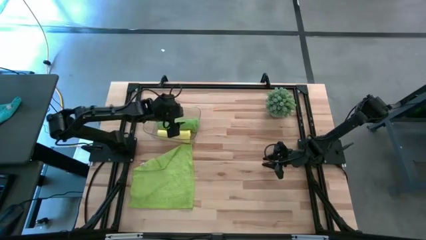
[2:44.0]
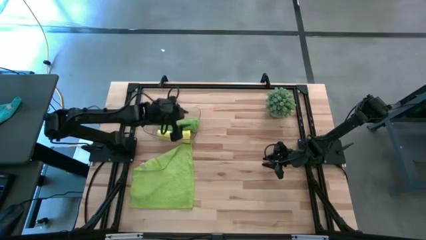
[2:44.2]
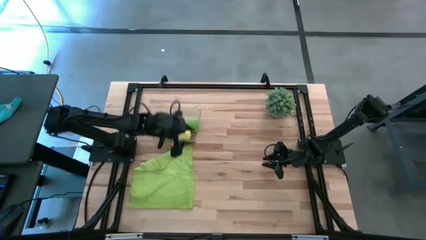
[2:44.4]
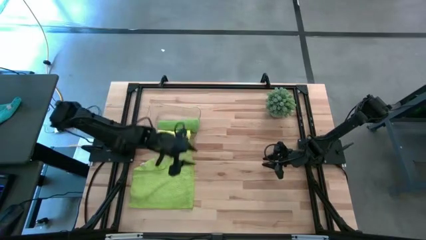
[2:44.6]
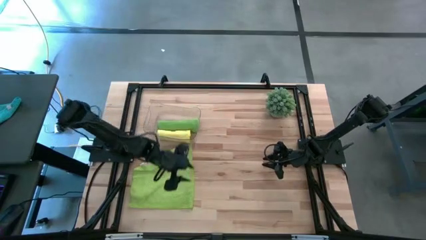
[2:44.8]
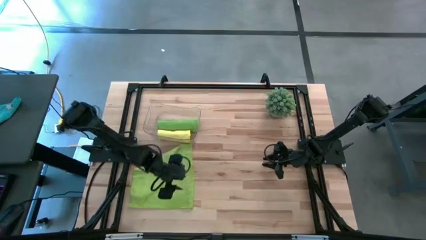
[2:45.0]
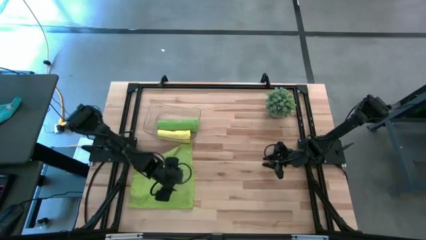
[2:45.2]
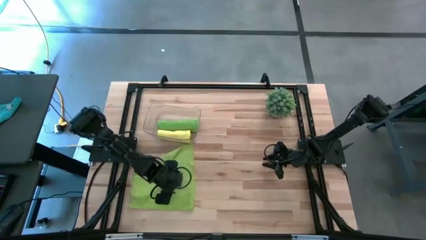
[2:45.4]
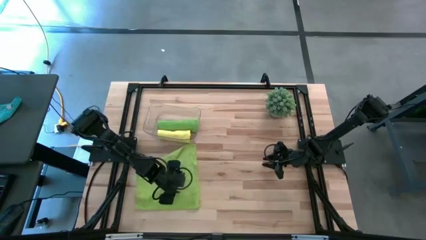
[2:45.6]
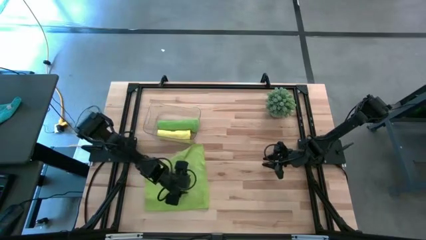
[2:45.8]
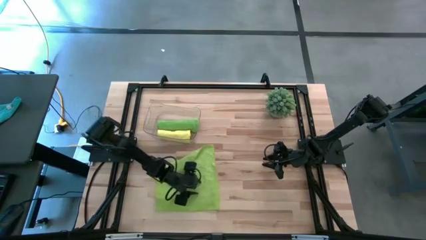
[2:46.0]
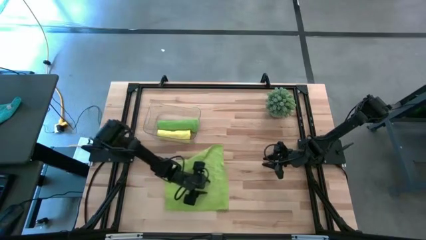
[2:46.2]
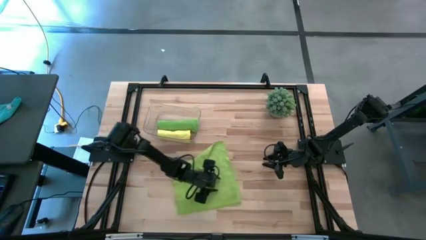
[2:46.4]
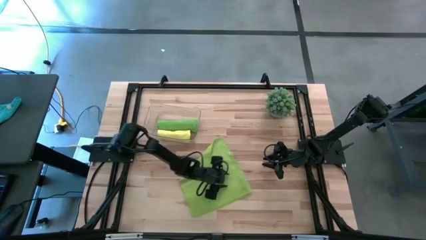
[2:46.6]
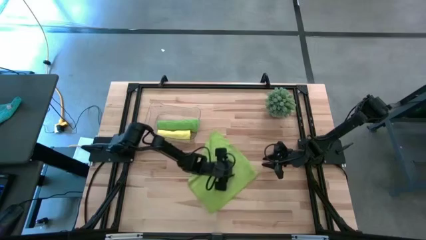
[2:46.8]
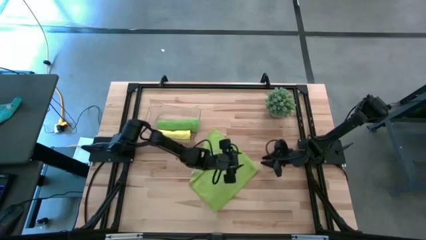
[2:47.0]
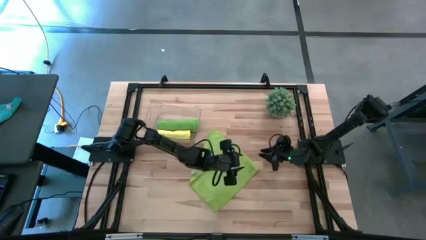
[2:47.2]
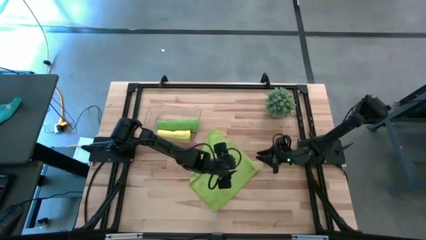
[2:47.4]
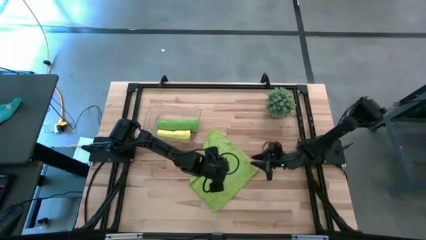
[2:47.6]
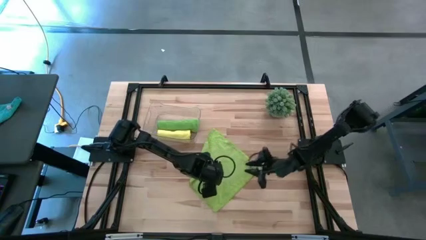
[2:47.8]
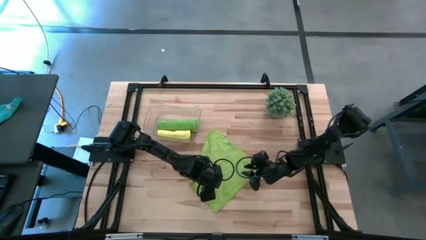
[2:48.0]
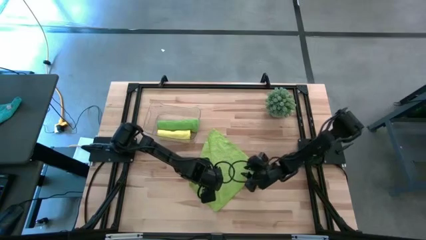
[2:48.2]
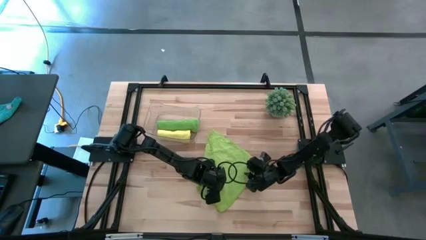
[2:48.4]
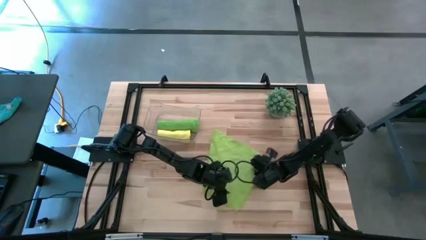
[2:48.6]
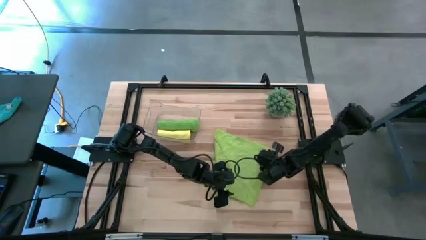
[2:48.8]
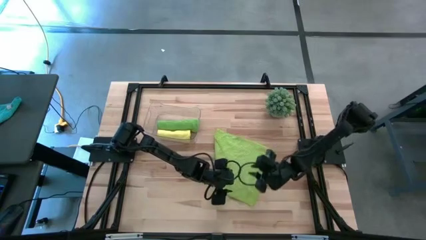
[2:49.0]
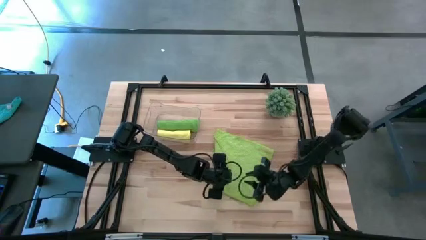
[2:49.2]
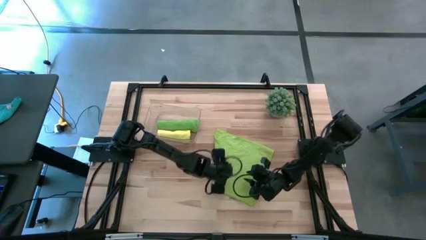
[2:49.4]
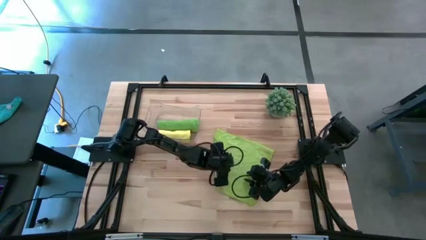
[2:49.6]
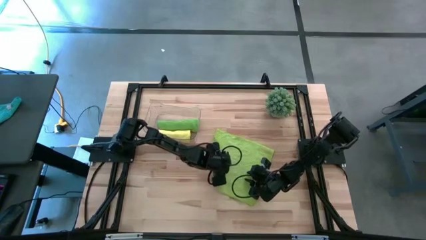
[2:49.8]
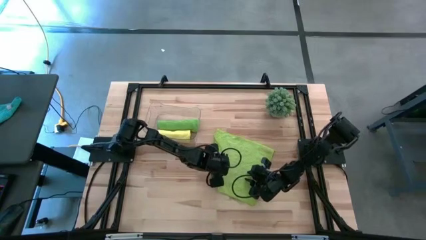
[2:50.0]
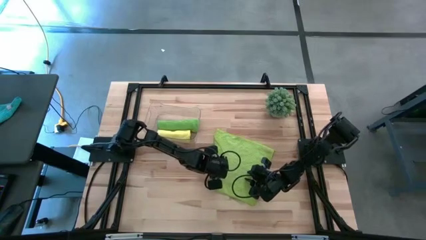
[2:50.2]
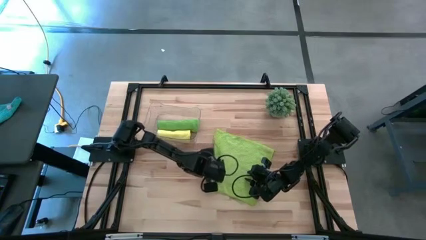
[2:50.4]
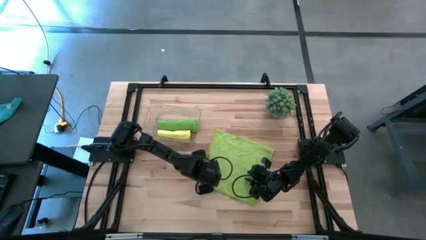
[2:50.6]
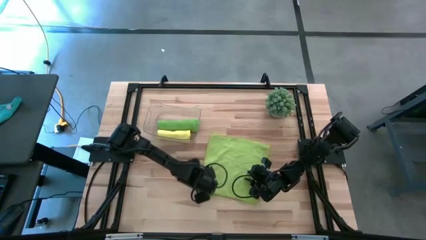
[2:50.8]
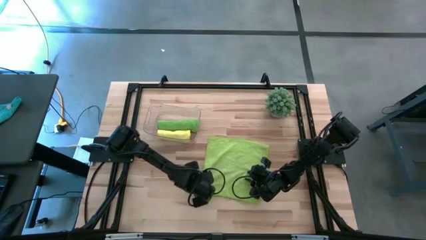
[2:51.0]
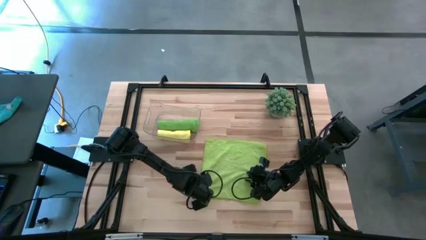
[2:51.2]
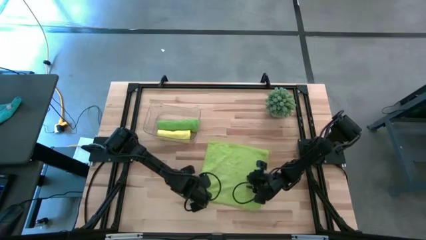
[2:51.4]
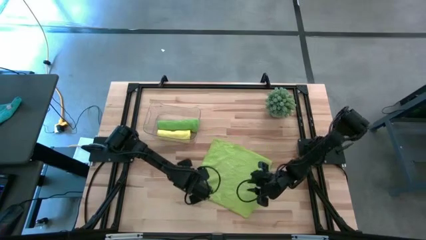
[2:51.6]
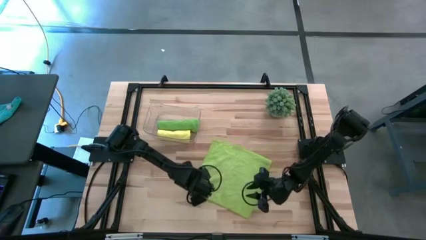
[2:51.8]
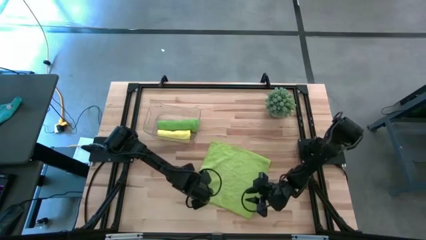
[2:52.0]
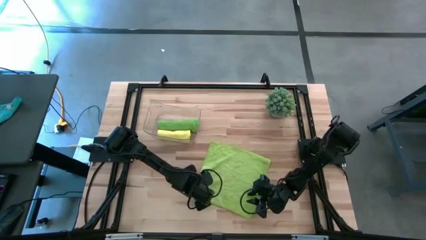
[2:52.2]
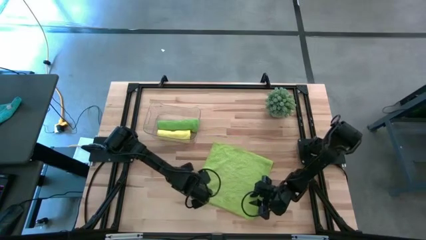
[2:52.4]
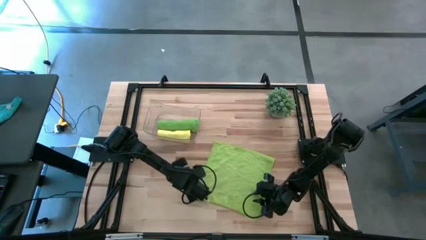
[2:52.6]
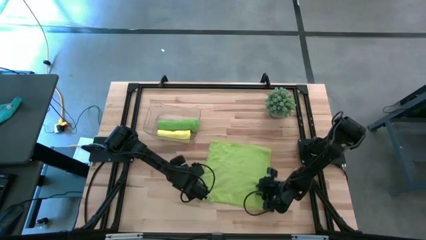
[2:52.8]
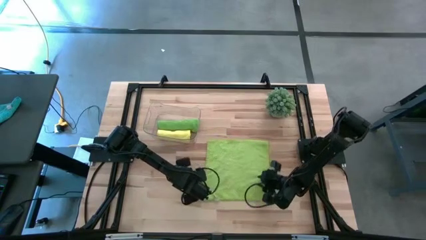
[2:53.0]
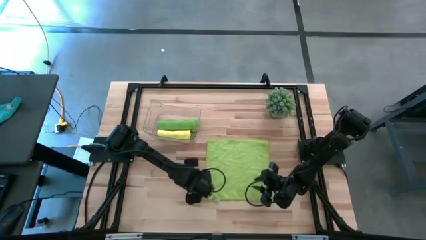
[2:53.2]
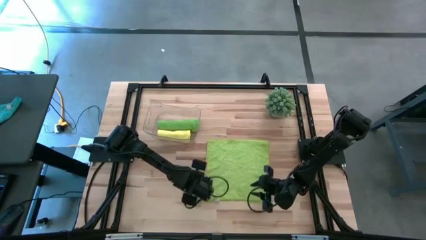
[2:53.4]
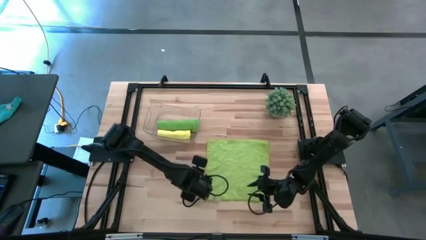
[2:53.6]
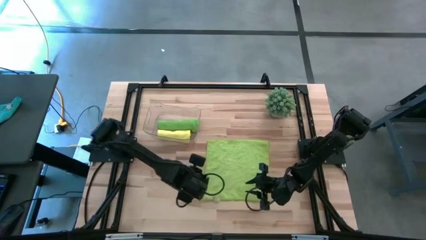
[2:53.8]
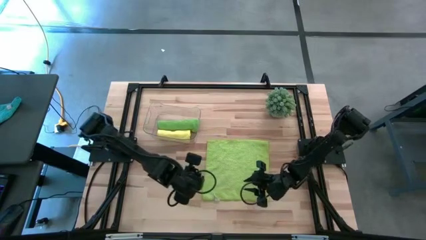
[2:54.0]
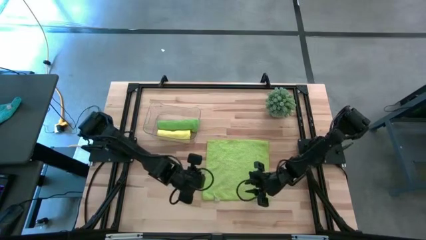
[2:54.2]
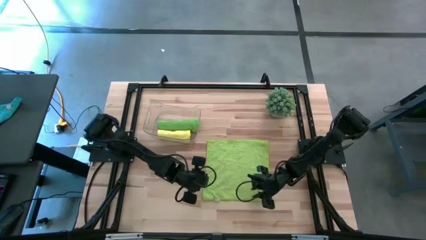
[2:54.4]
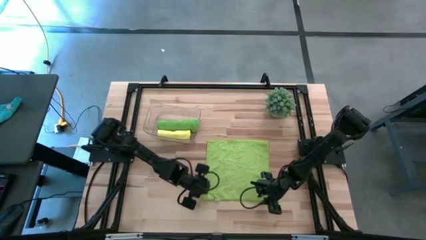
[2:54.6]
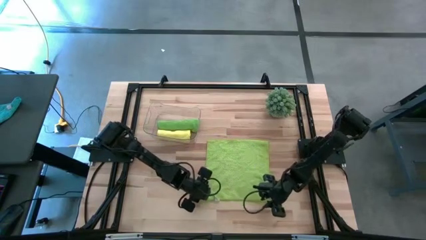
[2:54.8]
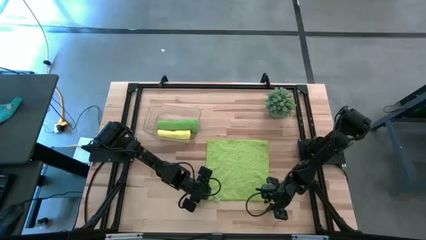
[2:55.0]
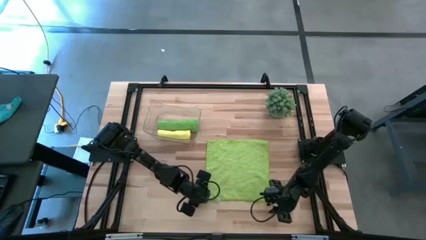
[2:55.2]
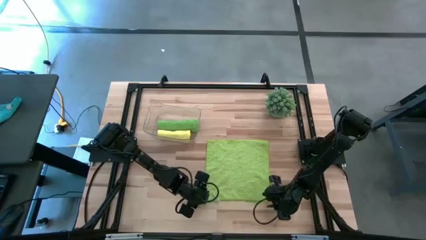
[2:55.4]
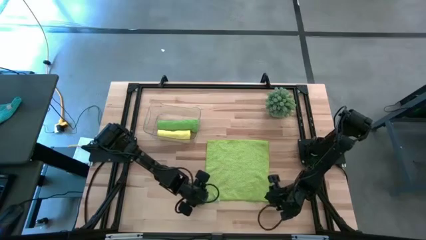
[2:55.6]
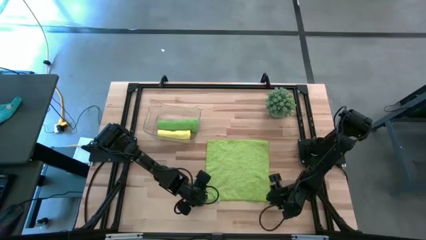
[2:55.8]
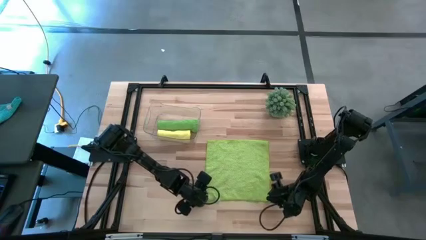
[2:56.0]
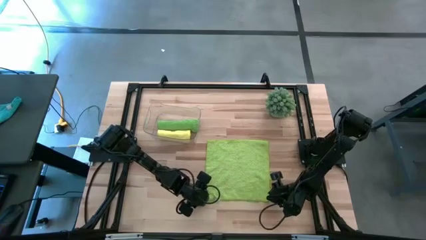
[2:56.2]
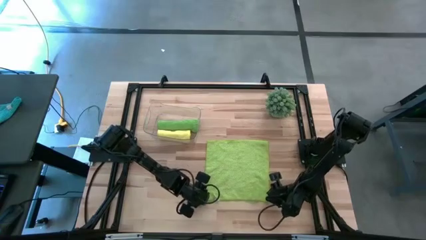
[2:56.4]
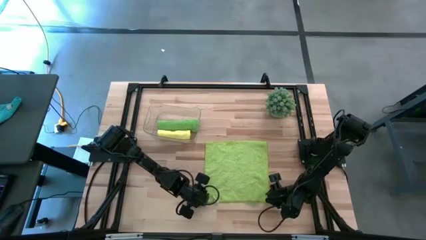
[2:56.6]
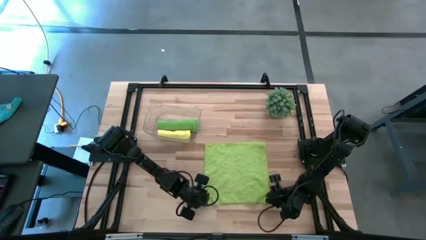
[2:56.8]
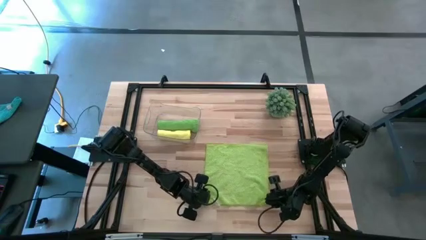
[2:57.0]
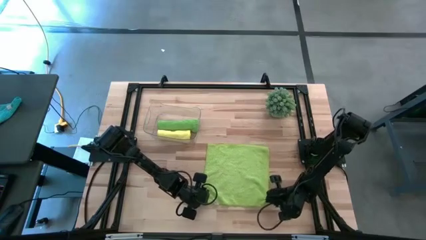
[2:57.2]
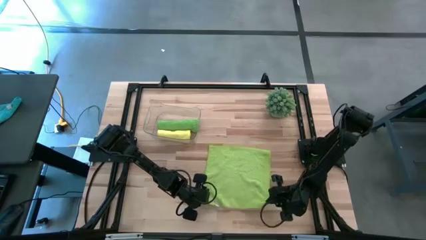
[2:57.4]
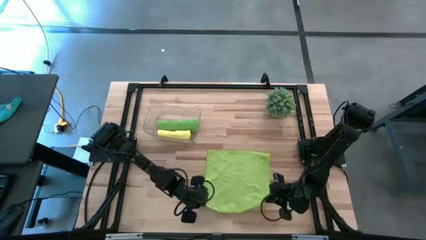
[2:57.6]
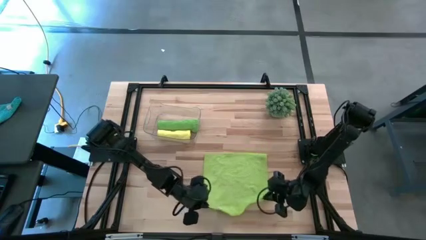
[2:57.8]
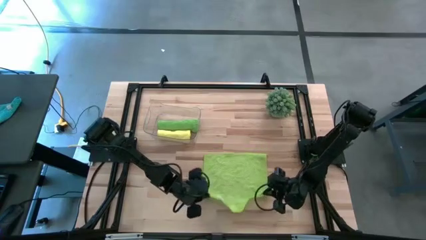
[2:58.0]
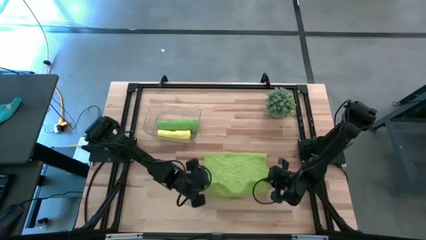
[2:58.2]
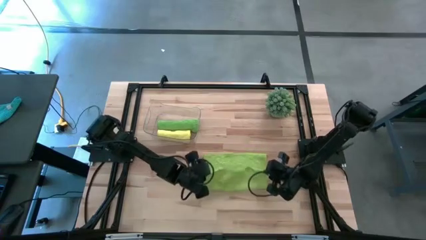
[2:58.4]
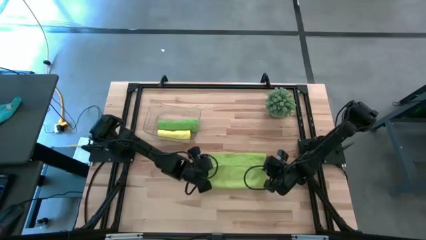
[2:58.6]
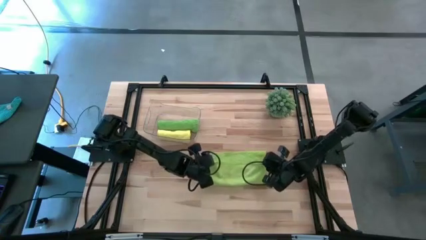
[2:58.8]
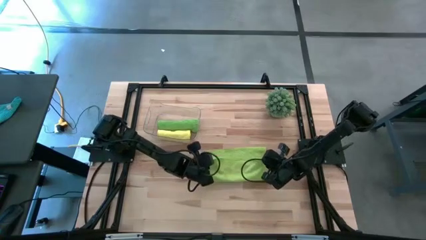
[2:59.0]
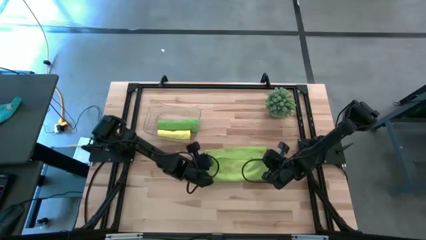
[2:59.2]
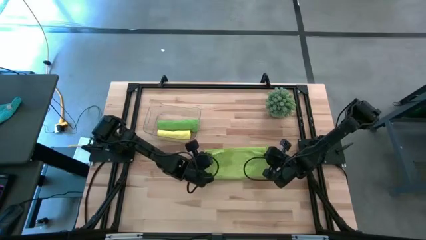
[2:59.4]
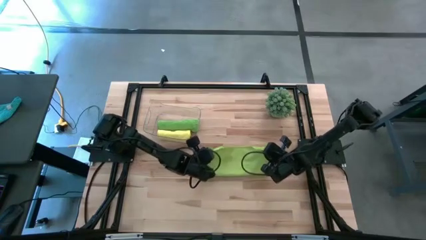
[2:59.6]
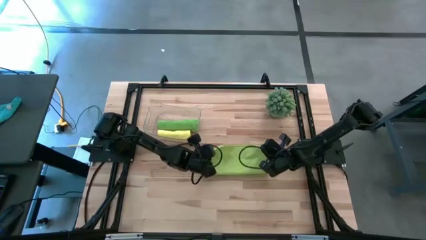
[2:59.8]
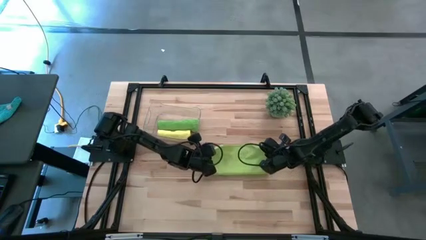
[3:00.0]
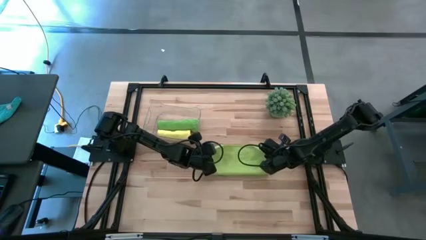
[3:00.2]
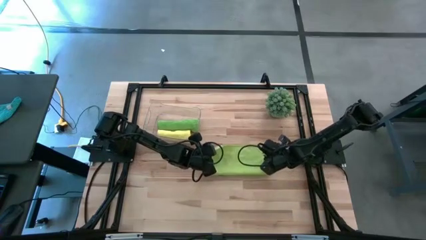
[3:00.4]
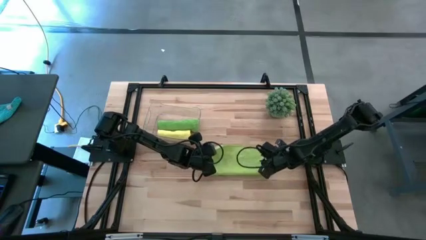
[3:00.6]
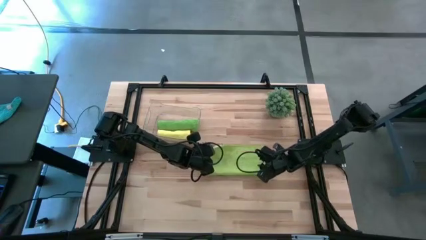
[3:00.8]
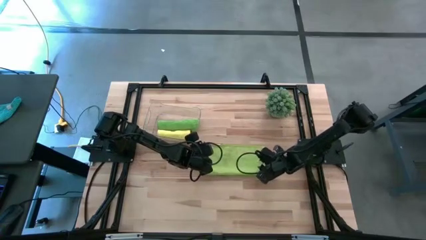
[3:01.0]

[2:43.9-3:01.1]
Task: Roll microfiber towels into tight, uniform cylinder then place into a basket
Fold the green towel
